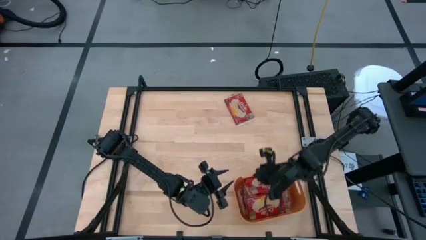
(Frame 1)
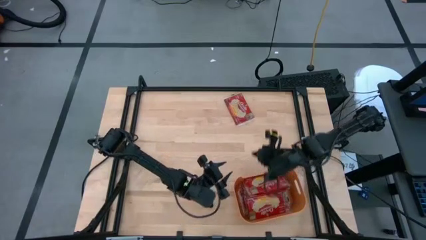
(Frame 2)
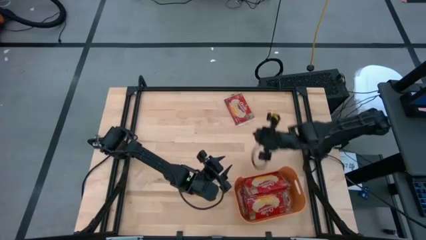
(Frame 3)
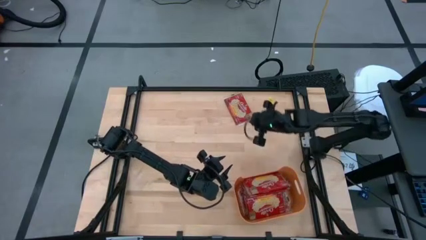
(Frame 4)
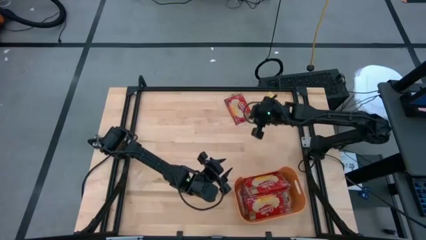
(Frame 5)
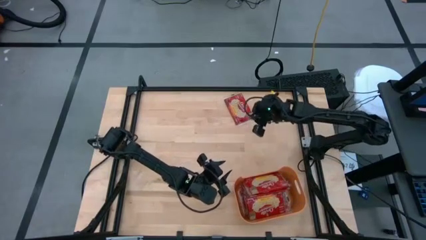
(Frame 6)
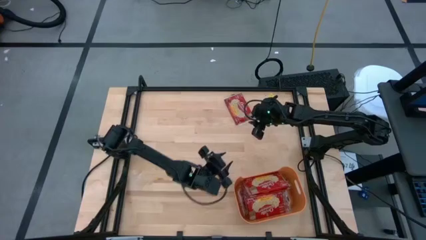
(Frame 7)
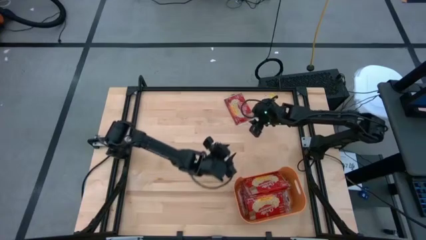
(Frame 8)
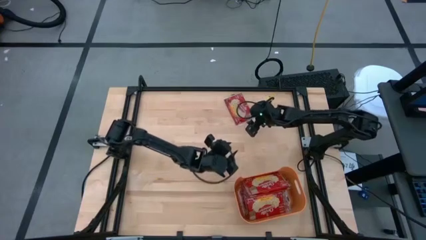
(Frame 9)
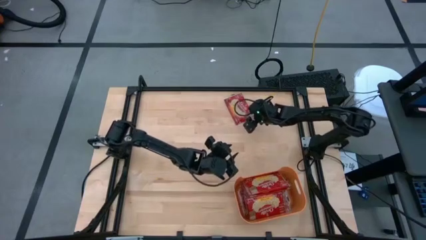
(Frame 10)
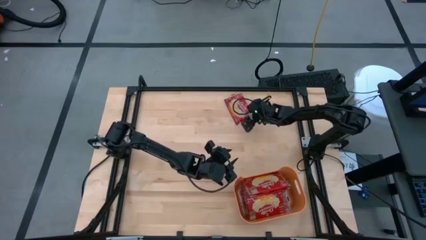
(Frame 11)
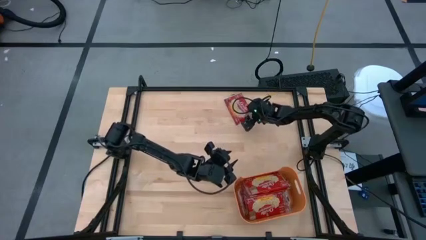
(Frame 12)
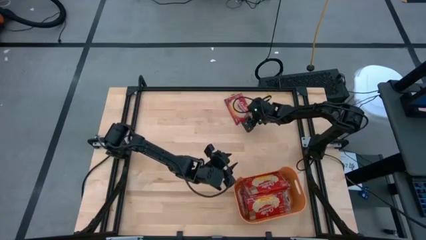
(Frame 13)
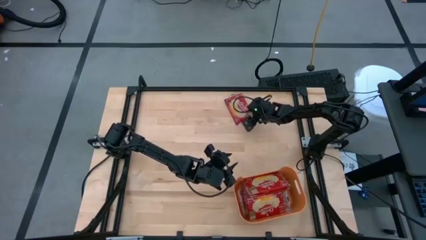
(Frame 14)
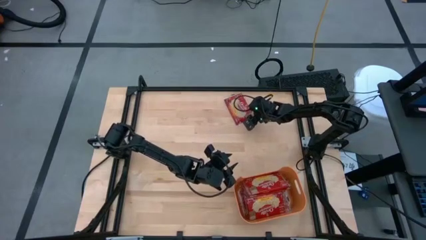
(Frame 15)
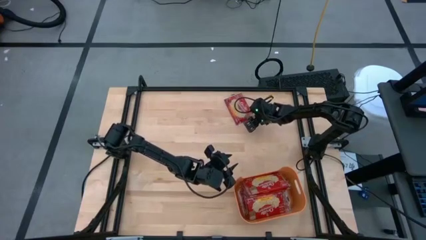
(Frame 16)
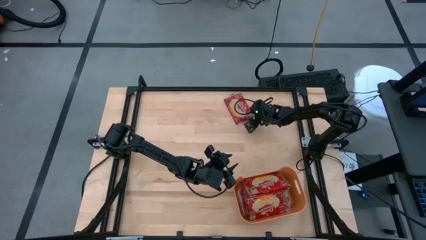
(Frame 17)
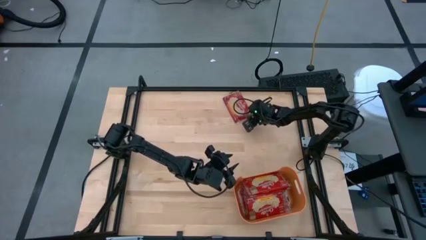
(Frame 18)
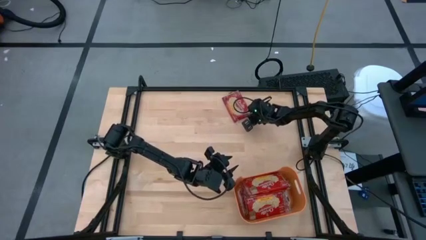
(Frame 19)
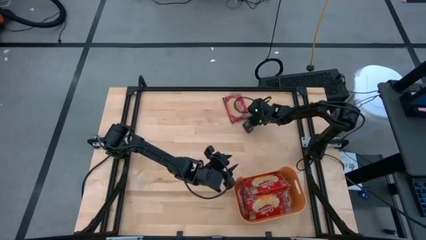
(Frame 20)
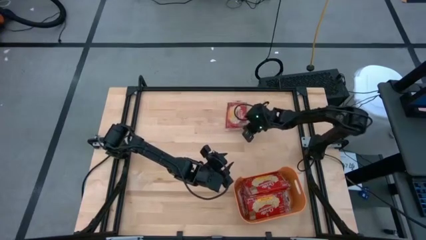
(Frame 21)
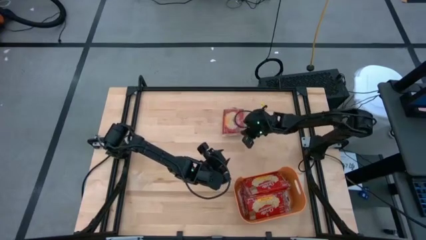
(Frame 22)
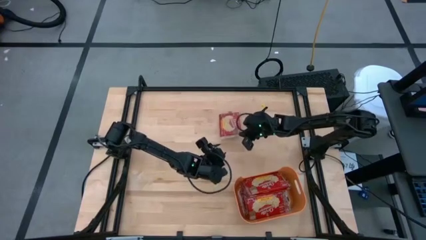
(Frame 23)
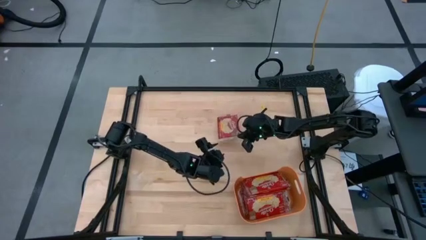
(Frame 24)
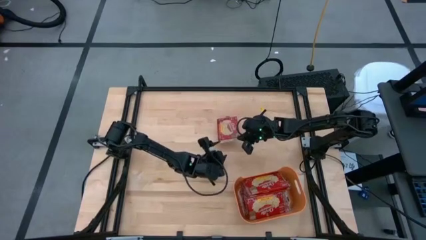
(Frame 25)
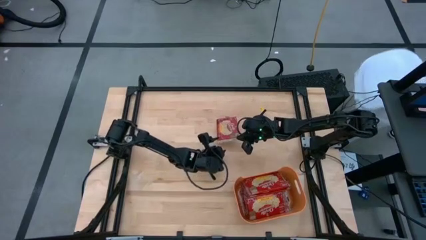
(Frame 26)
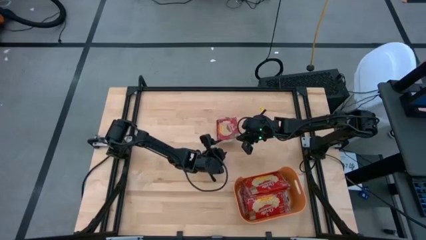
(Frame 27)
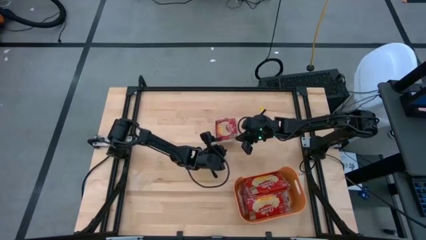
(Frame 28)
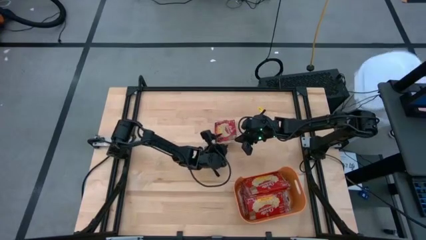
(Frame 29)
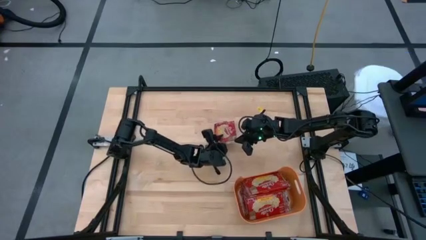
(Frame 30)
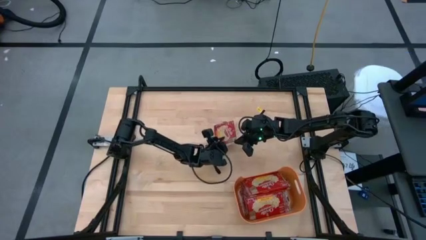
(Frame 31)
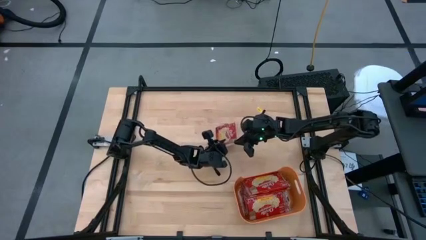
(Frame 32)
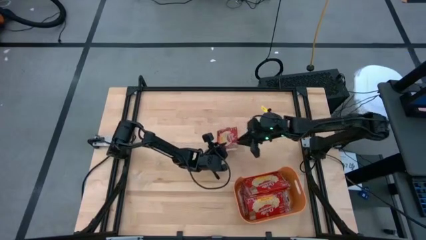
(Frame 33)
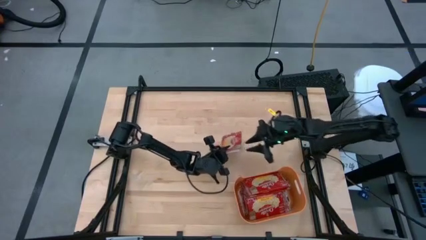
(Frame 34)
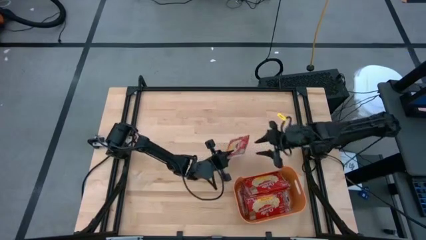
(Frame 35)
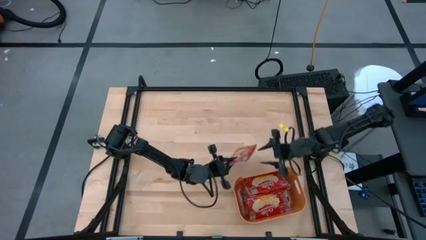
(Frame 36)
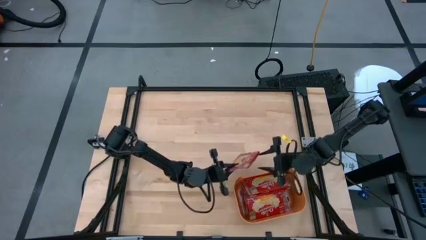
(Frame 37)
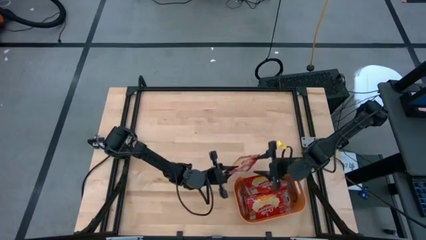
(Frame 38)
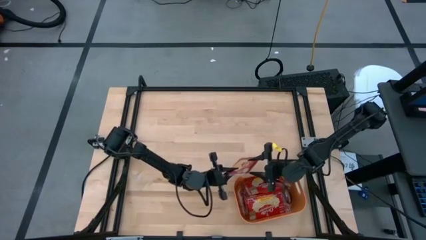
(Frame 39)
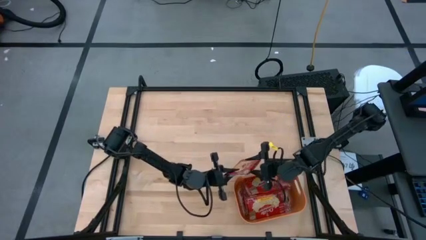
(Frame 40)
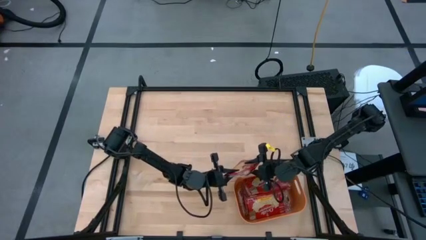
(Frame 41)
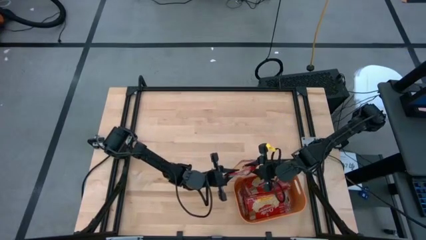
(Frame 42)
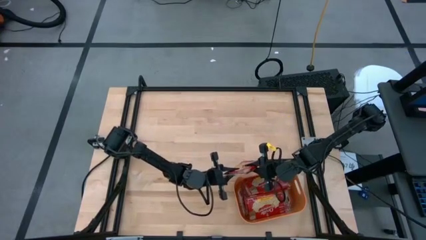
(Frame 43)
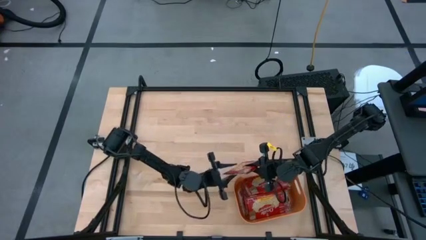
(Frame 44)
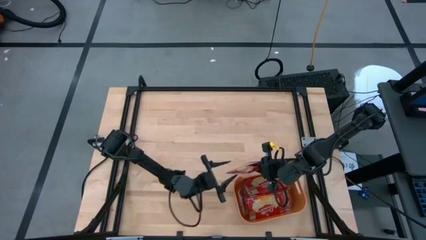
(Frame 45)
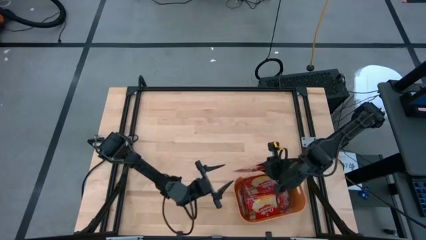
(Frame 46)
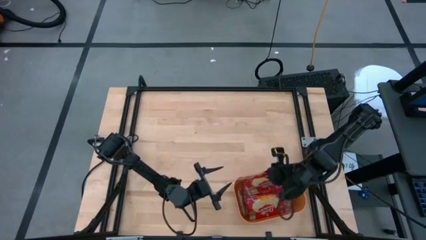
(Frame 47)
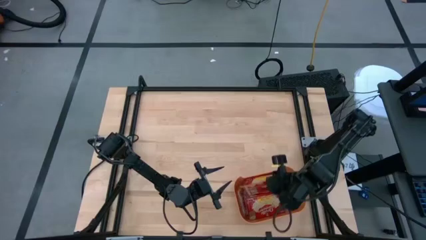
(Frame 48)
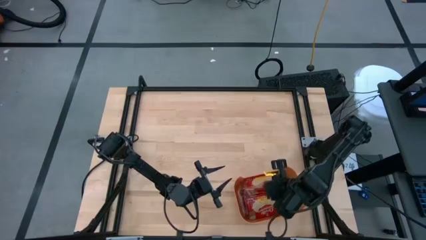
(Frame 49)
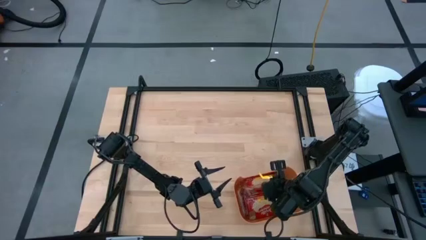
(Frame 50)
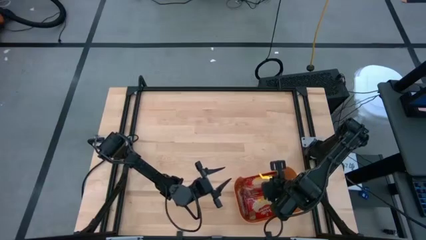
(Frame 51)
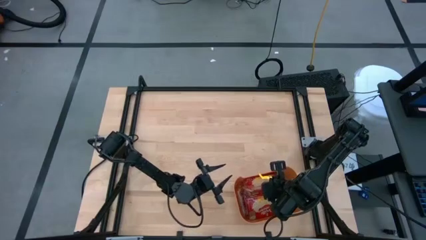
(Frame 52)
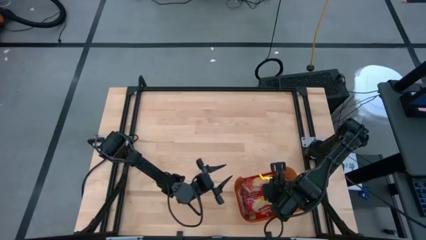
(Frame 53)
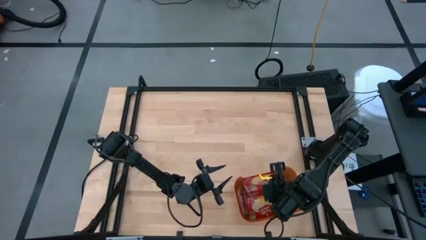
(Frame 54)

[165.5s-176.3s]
Task: Sort popcorn bags into baskets
Put the red popcorn bag into the orange bin

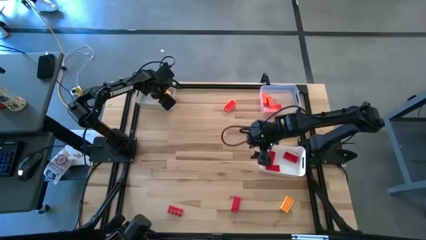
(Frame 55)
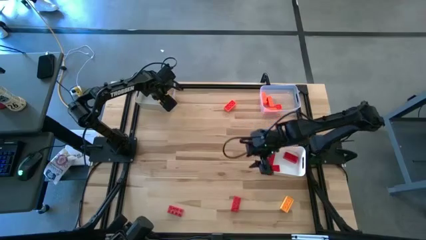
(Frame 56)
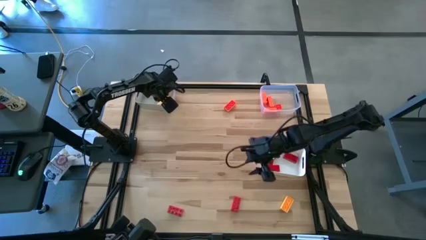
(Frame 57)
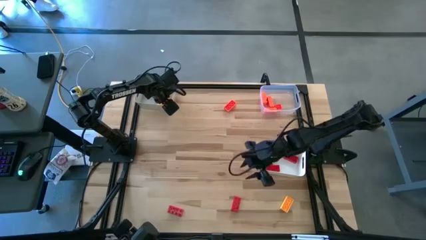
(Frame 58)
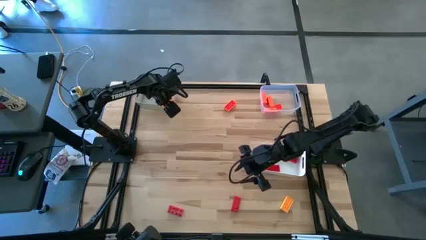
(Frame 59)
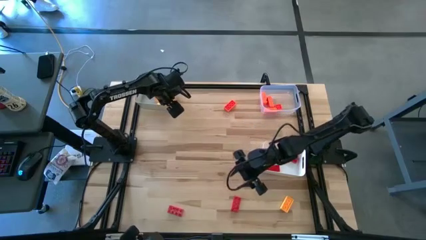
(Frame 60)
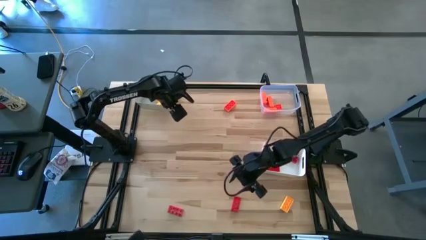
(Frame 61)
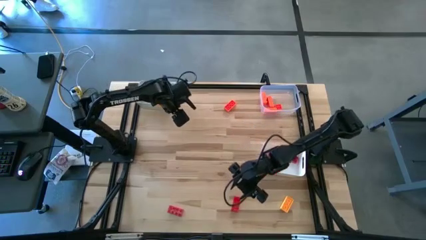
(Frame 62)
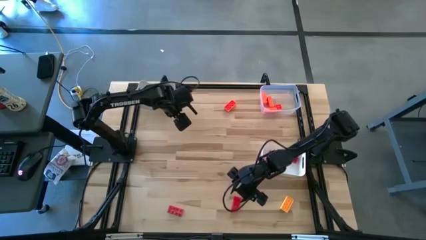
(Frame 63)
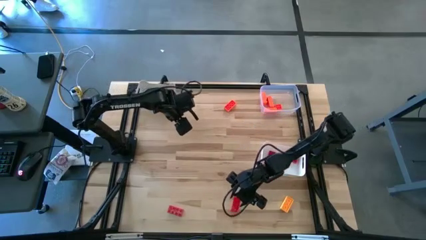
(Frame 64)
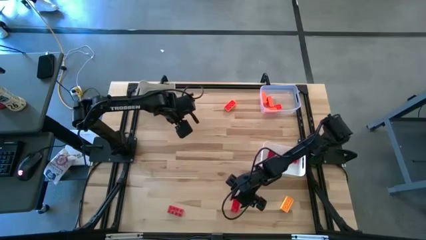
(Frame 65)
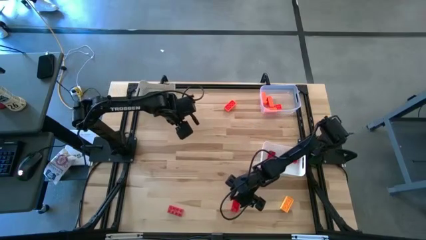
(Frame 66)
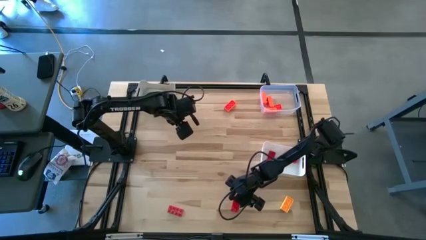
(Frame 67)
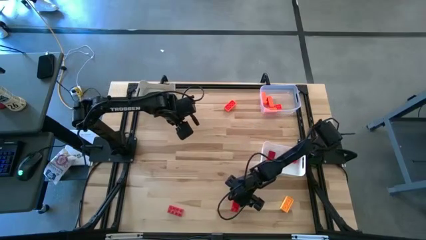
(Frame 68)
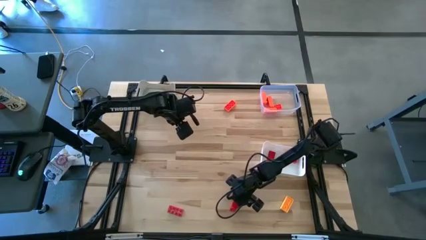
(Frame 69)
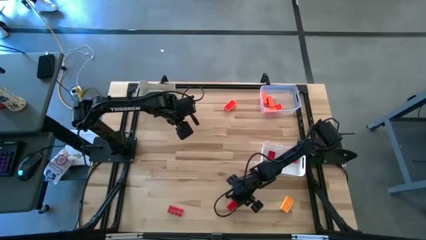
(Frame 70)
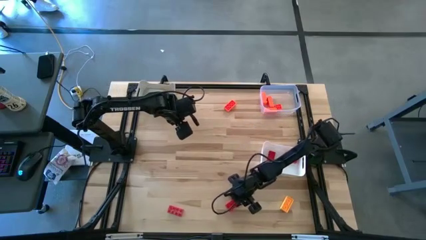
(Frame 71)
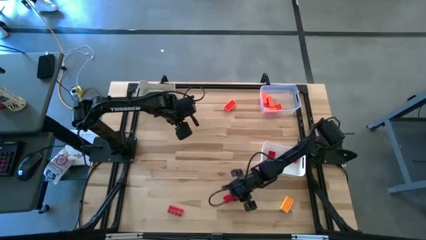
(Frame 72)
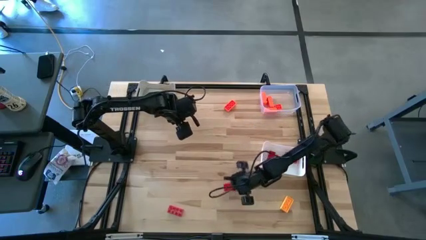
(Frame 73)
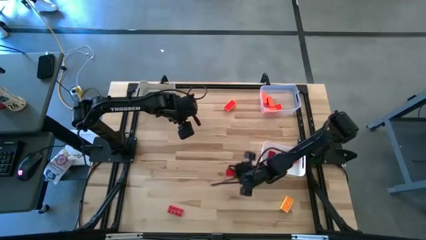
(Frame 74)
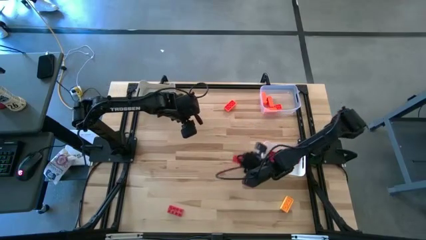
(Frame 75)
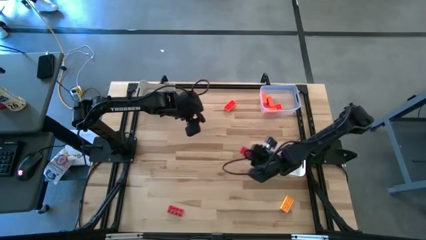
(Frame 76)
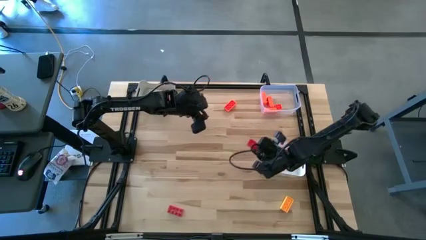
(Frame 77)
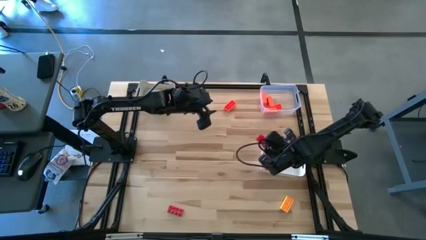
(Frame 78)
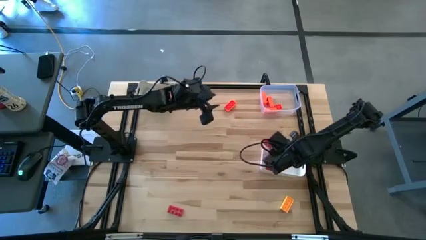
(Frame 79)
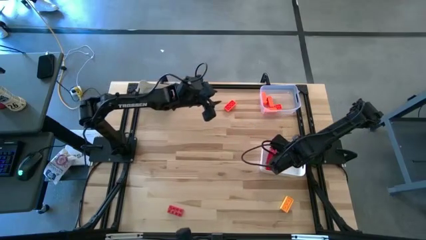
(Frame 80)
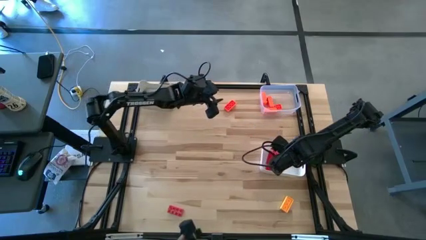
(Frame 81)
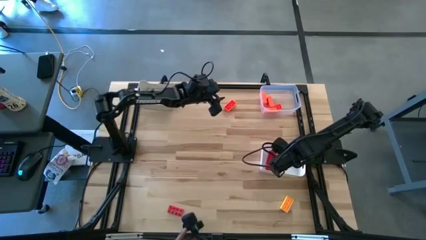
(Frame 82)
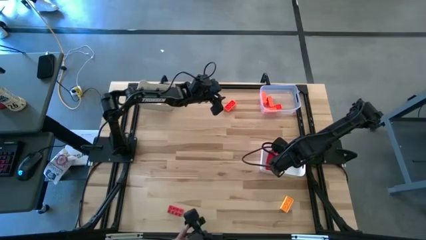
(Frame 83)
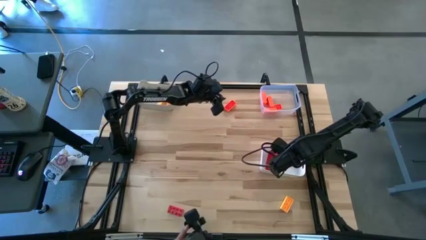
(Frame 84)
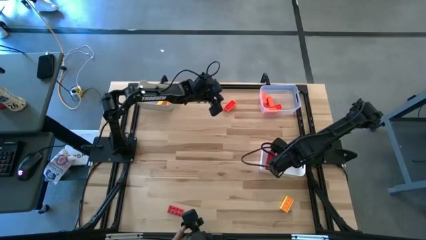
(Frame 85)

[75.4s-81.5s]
Task: Sort & place blocks by color
Put the red block into the white bin
